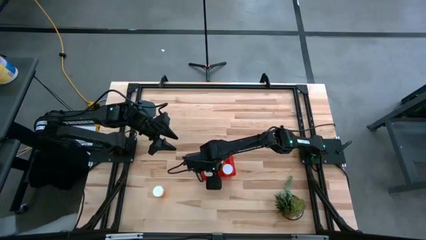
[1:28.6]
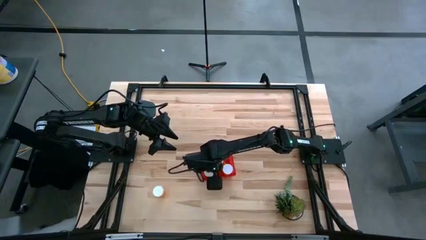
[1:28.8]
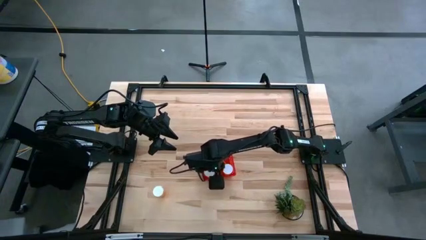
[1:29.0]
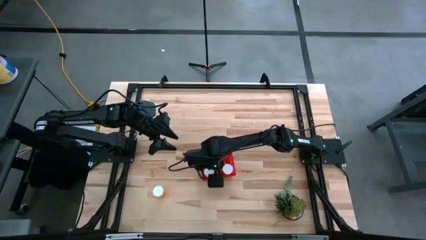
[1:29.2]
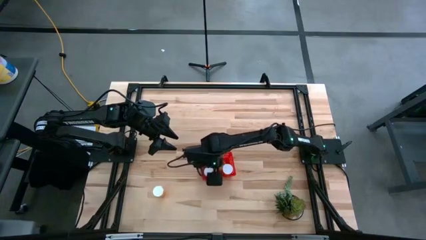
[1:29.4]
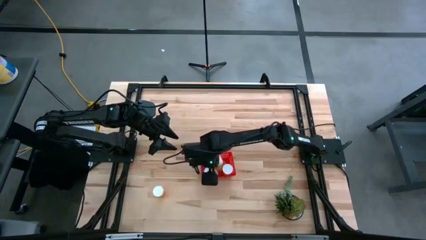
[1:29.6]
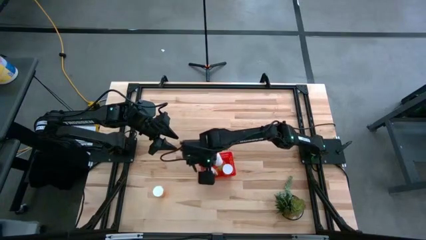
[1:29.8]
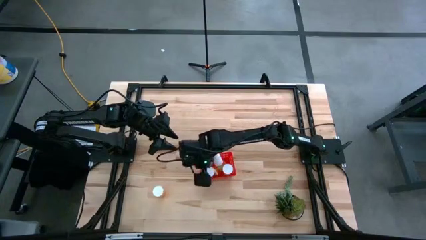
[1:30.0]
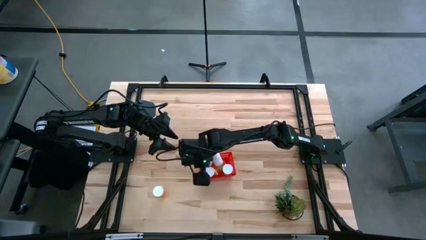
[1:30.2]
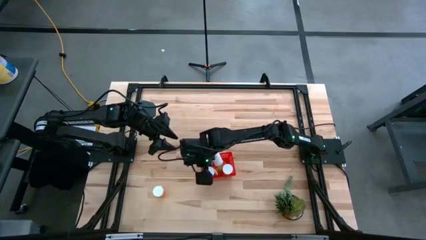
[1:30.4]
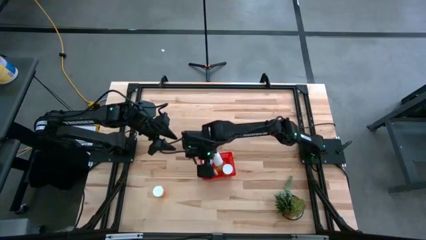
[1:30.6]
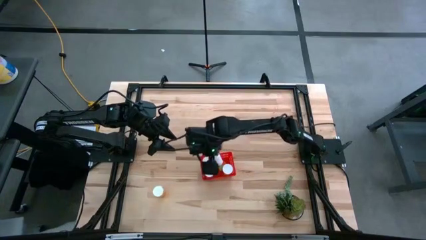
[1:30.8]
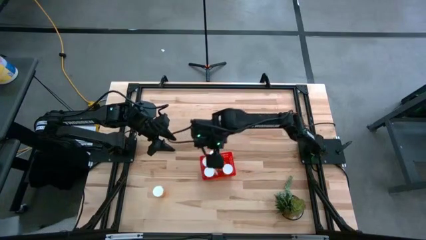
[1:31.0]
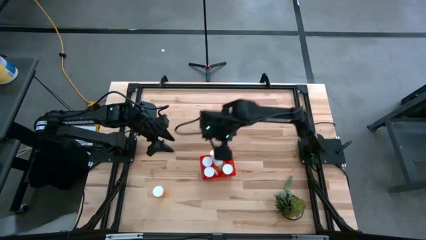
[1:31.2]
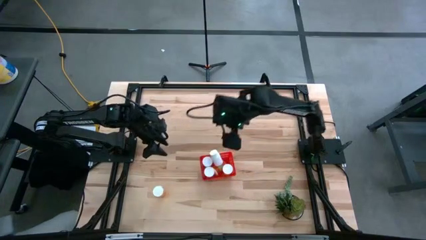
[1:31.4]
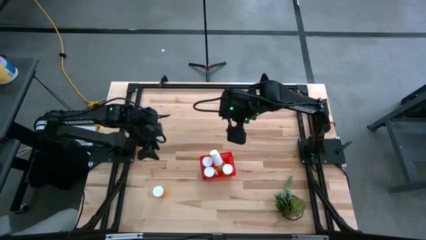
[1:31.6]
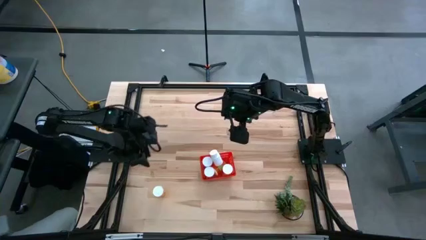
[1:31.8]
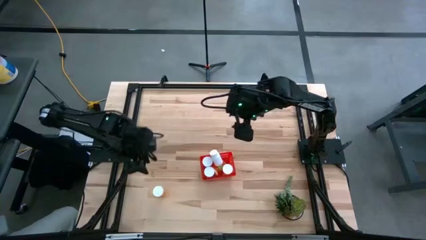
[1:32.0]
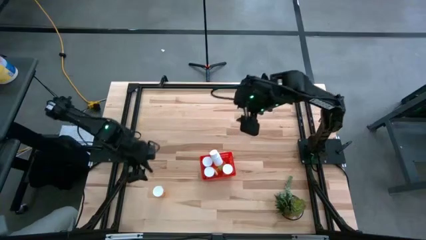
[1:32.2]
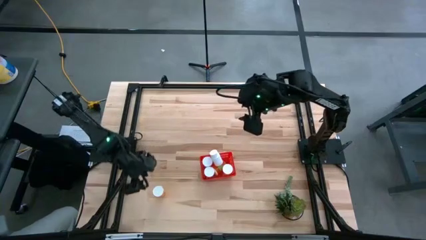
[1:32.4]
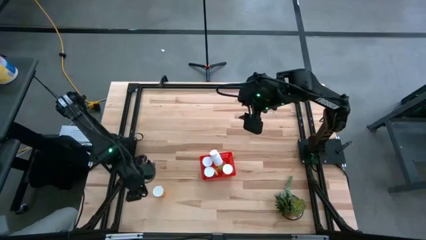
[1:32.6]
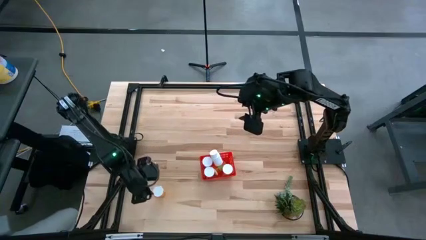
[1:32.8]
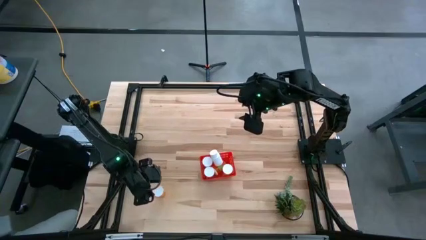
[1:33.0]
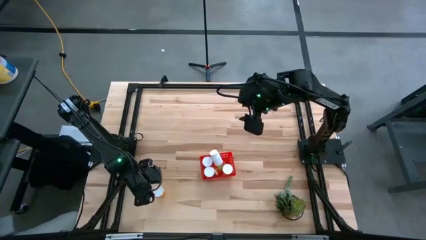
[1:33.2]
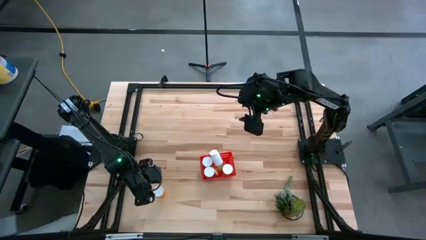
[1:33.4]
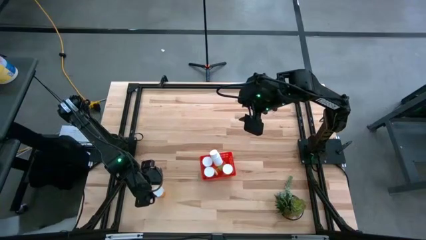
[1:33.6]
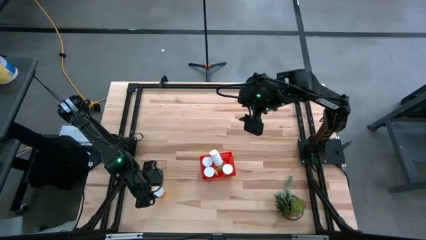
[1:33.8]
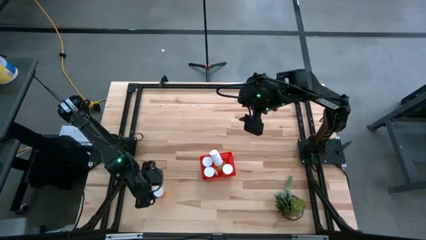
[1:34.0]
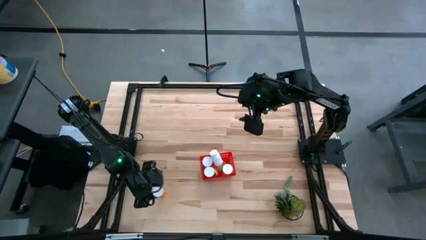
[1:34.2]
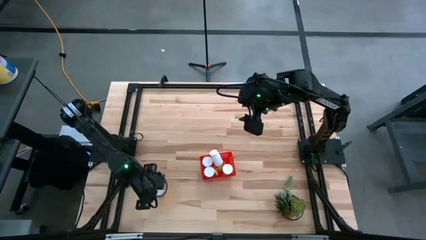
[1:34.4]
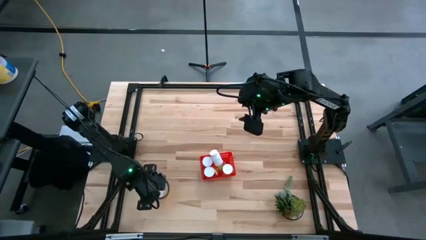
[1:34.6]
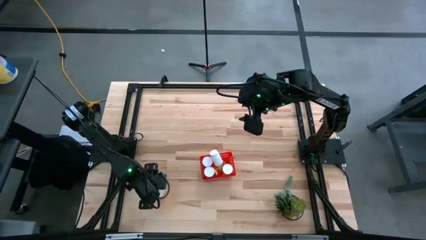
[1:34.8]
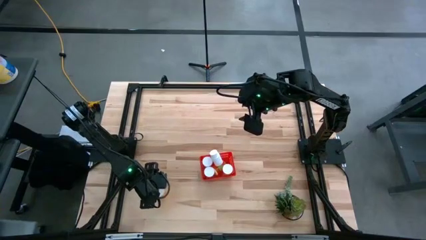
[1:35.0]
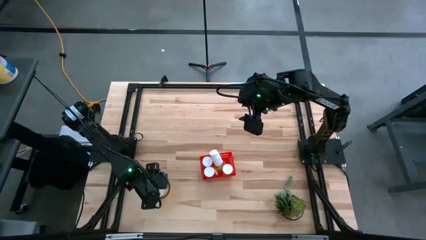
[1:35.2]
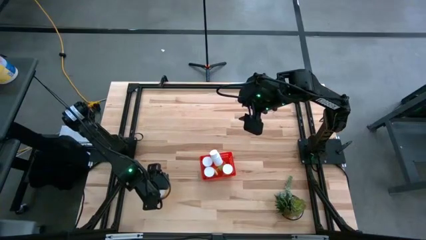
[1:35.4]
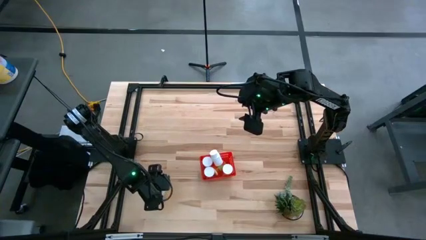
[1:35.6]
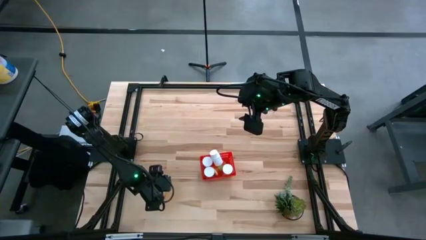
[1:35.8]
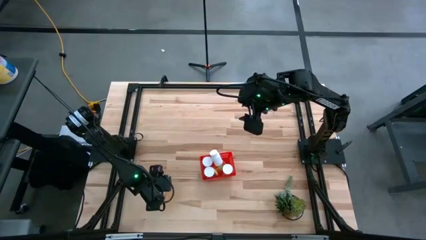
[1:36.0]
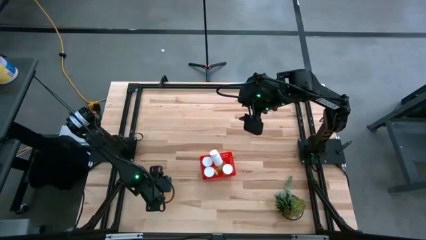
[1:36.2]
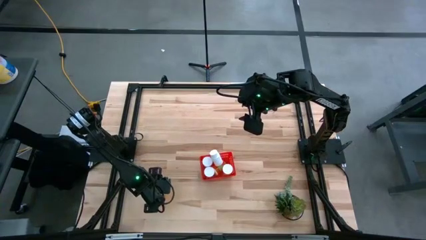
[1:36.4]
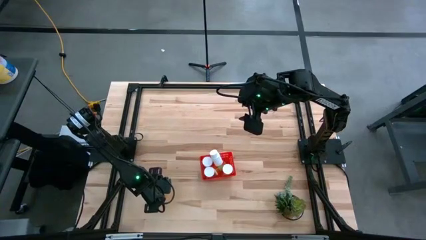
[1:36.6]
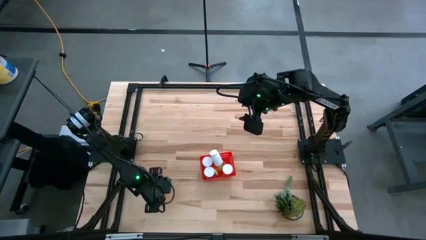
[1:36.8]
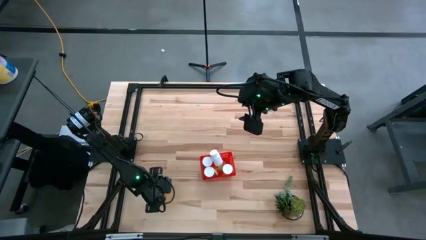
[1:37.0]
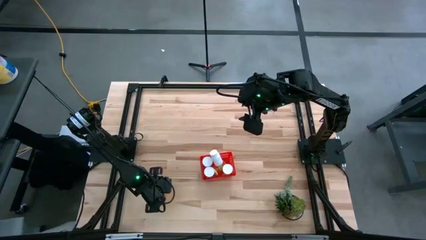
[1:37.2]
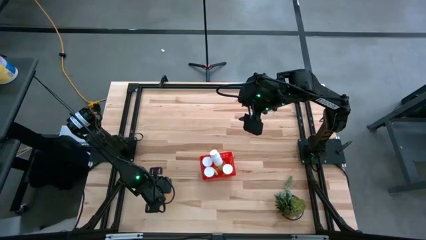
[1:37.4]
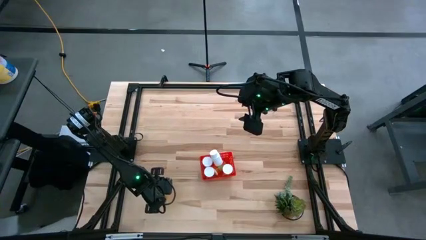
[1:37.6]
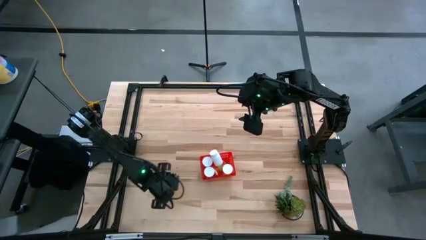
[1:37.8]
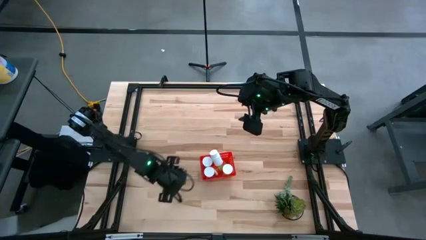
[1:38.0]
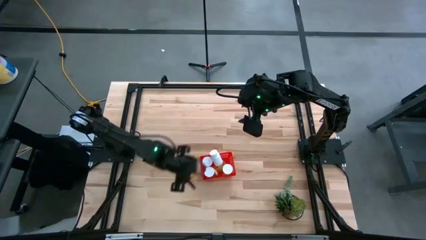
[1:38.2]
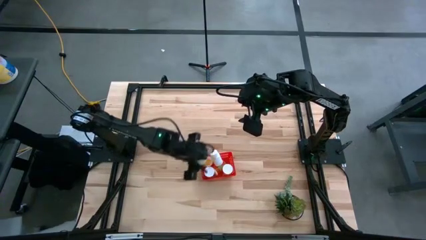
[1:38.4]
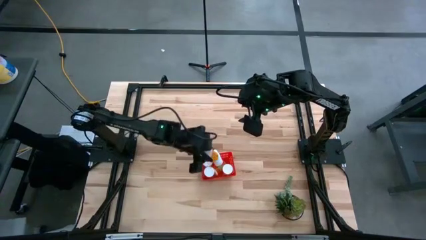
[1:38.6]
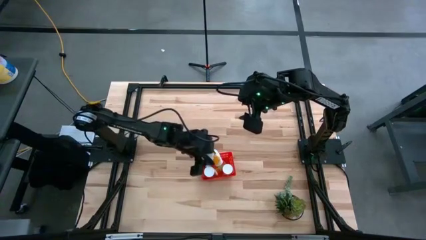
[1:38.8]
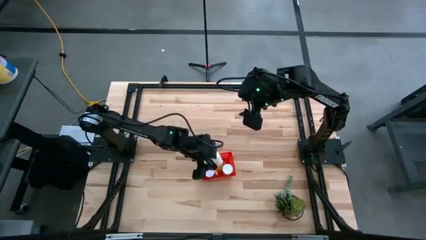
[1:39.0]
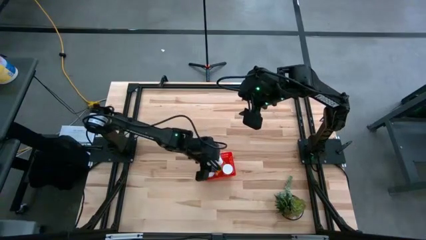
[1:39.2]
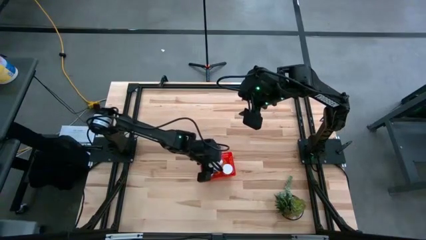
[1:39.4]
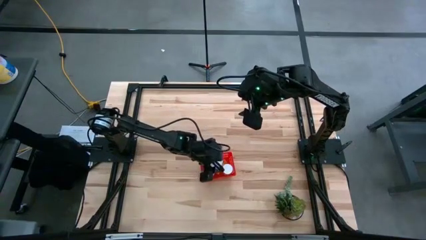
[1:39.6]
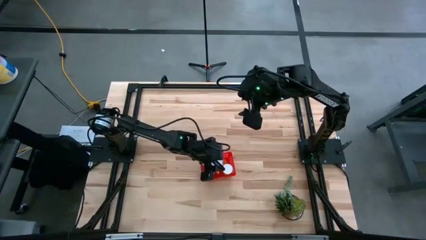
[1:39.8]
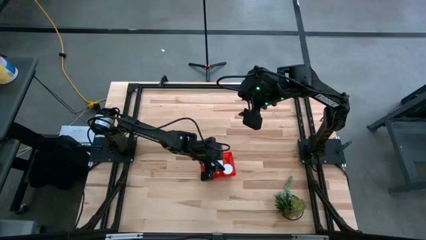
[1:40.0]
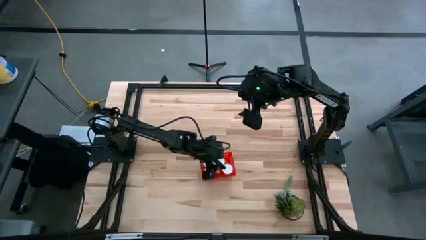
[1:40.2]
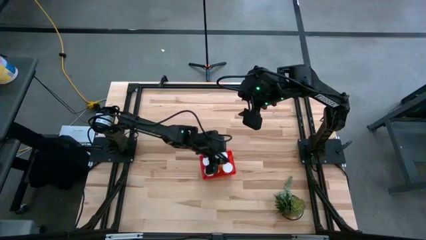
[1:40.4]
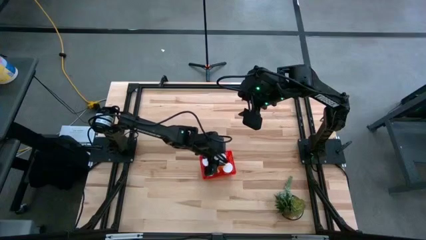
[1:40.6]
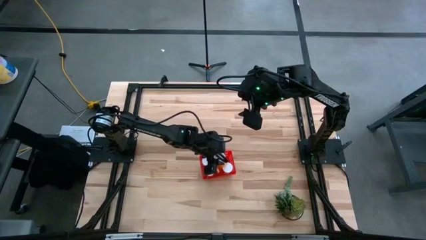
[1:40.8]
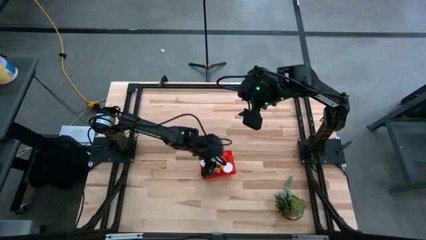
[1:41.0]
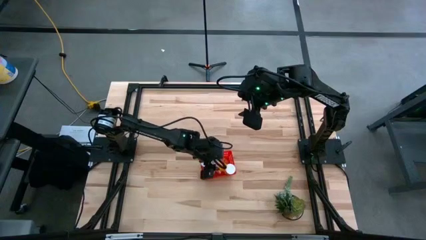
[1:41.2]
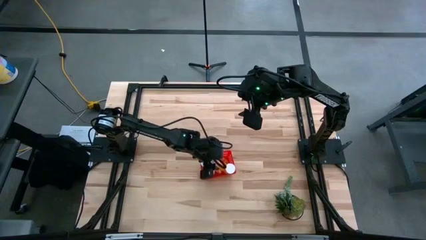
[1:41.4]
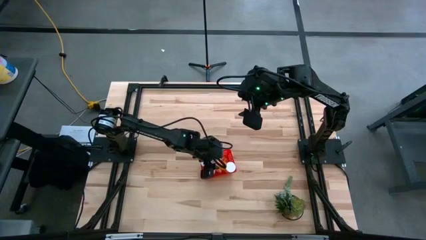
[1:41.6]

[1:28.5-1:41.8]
Task: Pick and place pill bottles into a basket
Put the orange pill bottle into the red basket

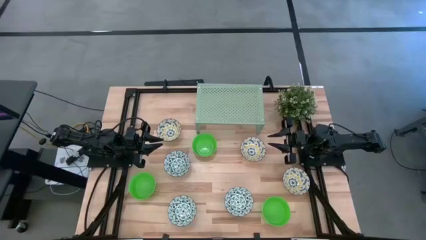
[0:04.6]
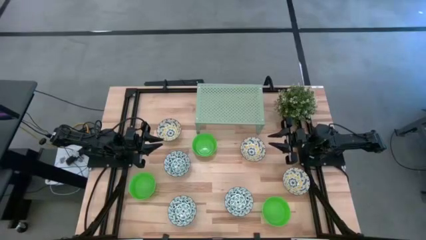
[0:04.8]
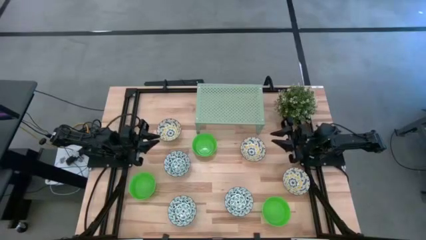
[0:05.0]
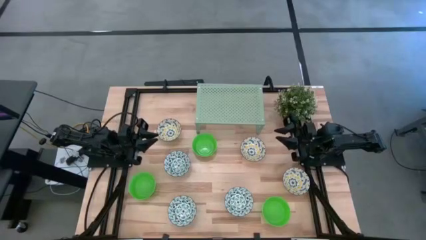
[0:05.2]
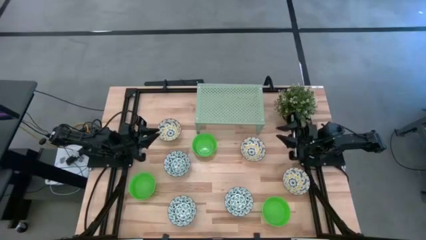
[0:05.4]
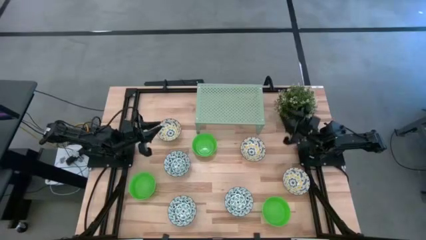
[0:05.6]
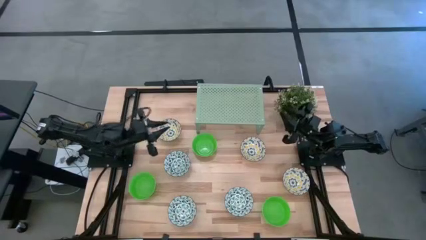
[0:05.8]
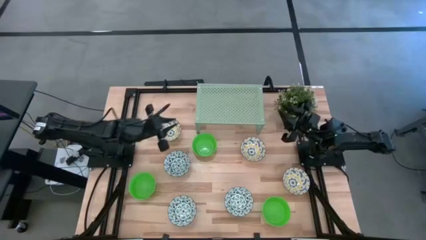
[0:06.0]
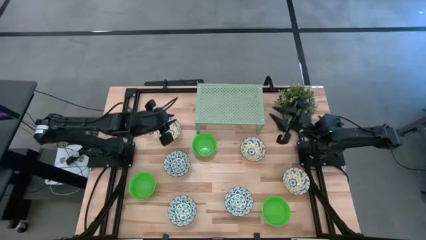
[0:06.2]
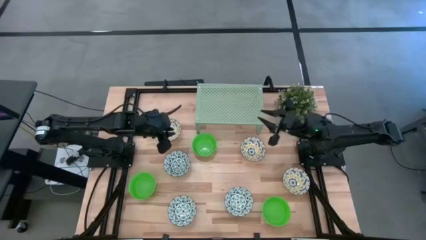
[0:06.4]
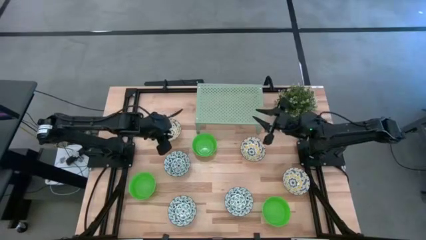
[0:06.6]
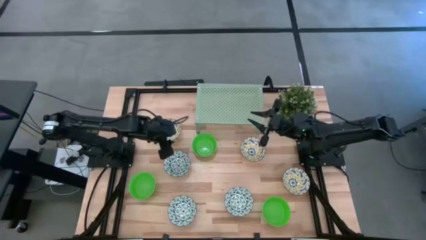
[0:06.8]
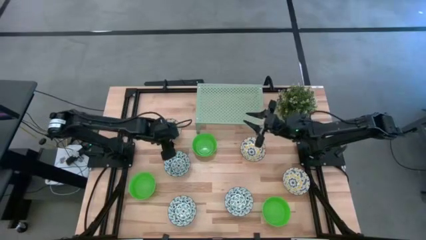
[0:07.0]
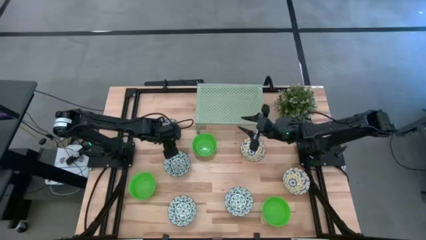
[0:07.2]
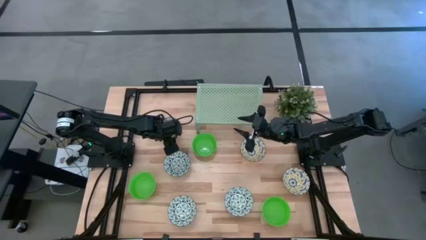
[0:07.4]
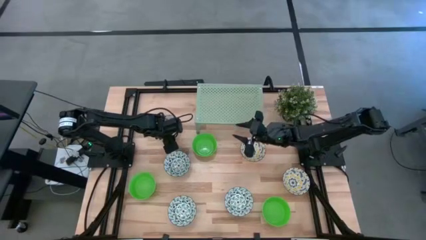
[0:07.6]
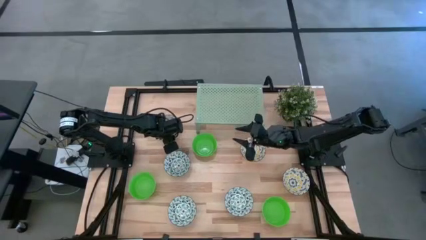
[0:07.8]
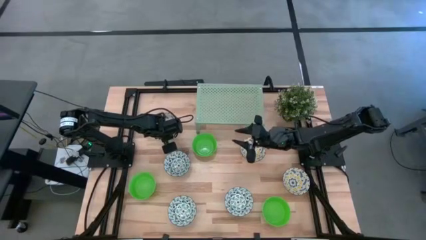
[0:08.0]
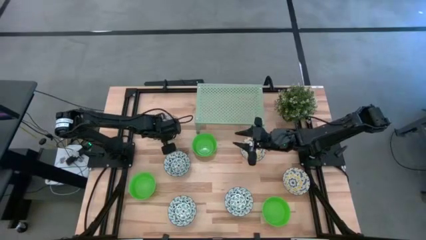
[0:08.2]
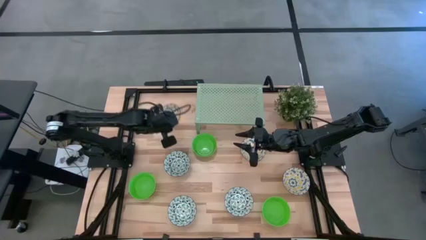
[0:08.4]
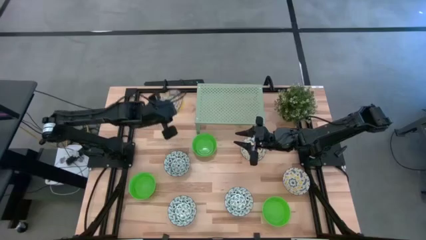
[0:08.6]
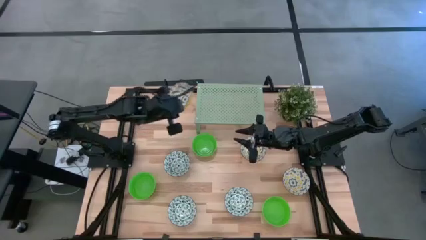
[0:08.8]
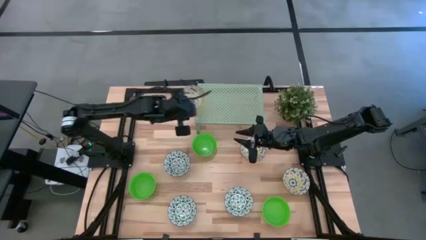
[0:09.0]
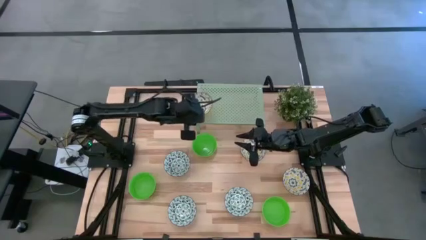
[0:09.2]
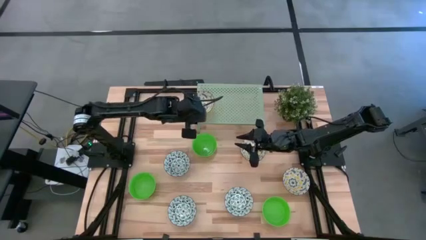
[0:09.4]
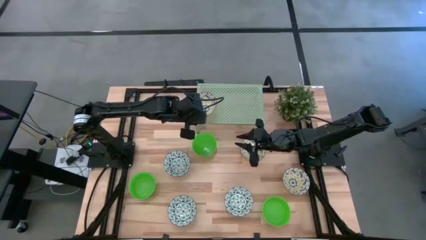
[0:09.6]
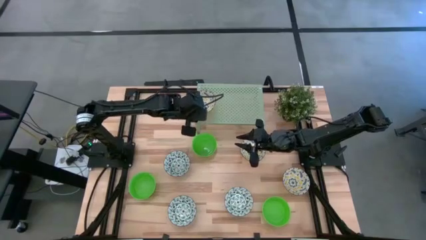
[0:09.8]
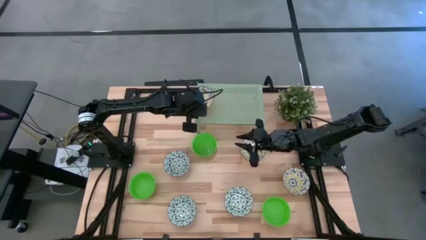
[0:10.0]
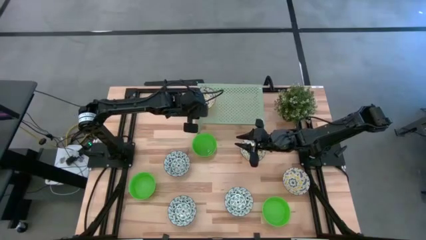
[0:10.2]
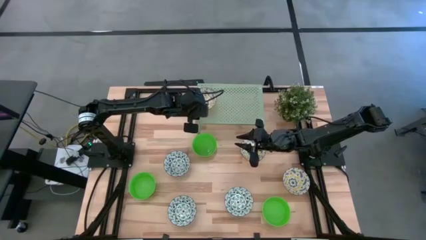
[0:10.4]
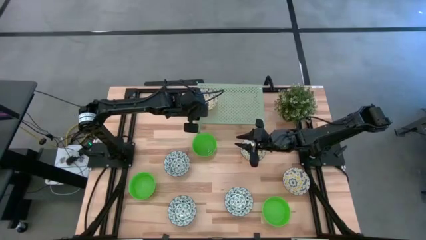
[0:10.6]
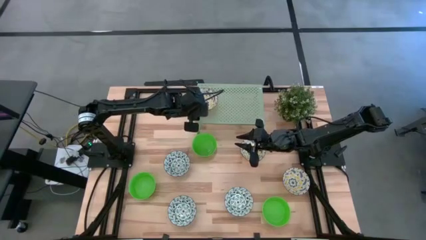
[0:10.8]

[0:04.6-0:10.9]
Task: Pick & Place Mini bowls
Put the left yellow patterned bowl on the shelf
